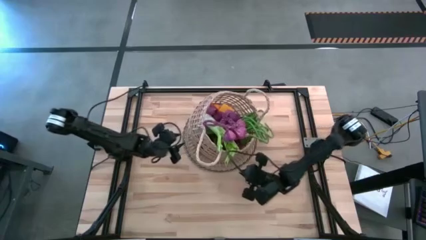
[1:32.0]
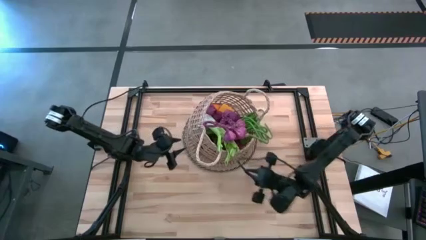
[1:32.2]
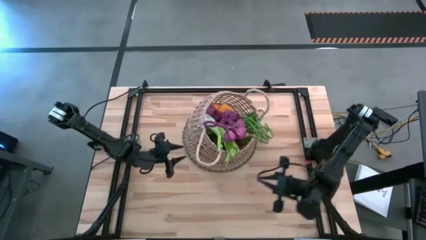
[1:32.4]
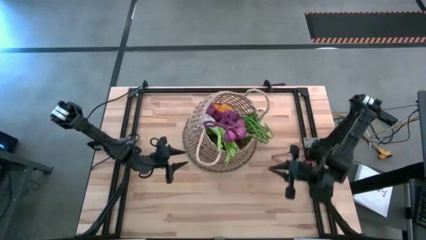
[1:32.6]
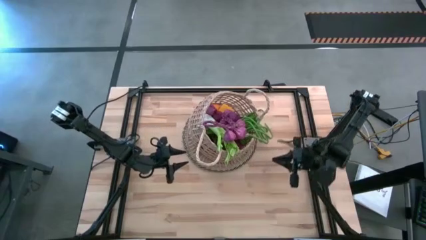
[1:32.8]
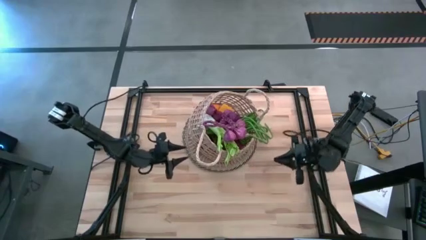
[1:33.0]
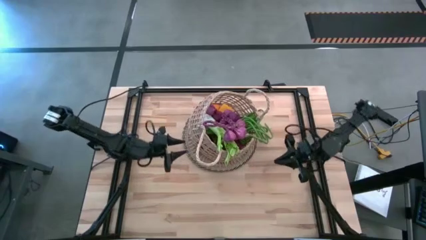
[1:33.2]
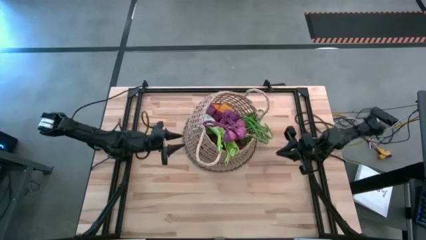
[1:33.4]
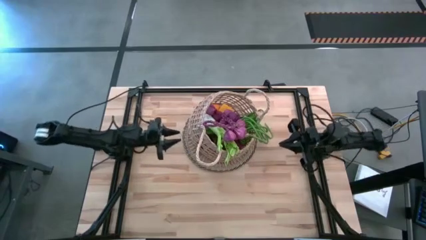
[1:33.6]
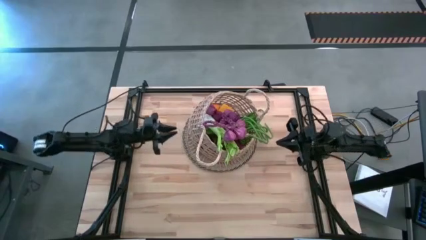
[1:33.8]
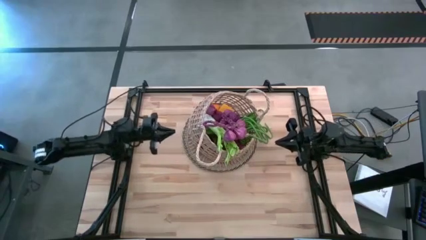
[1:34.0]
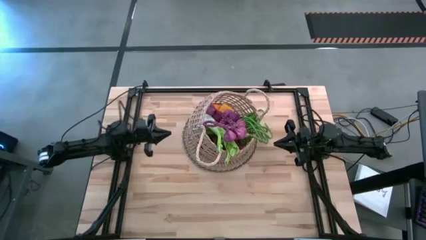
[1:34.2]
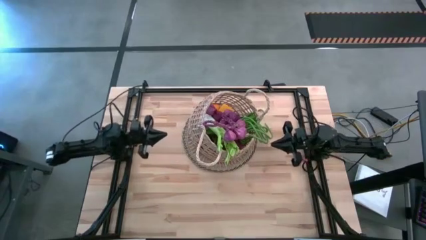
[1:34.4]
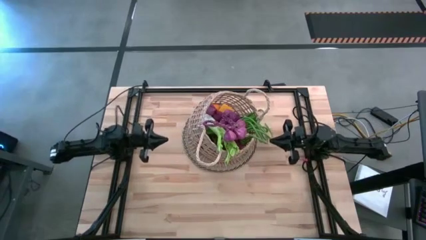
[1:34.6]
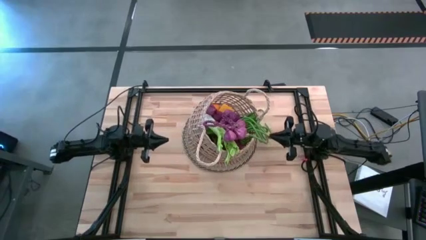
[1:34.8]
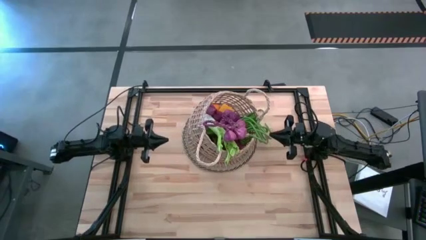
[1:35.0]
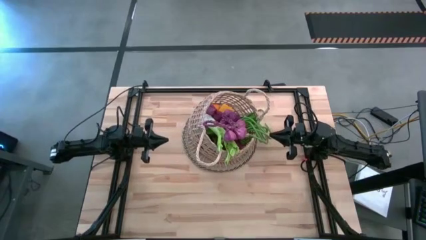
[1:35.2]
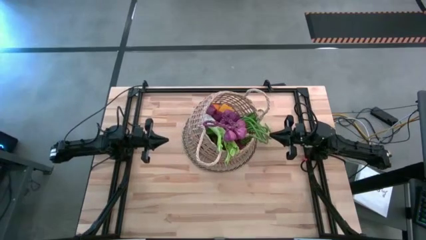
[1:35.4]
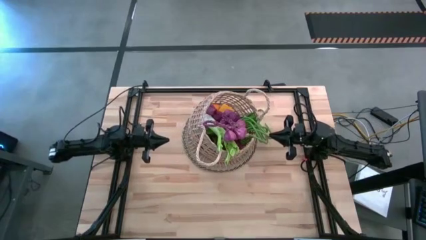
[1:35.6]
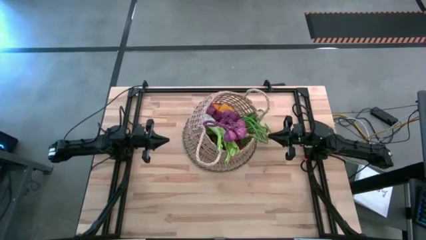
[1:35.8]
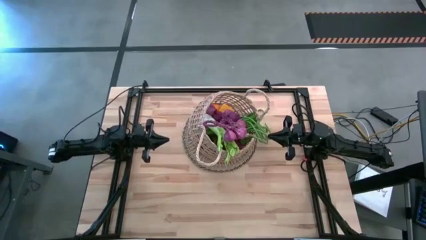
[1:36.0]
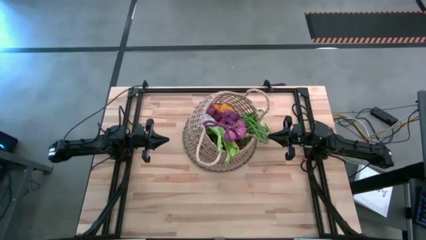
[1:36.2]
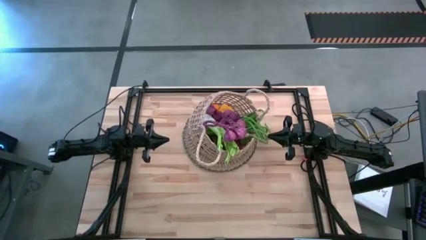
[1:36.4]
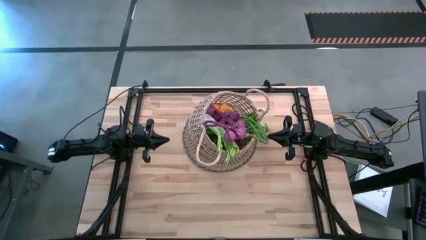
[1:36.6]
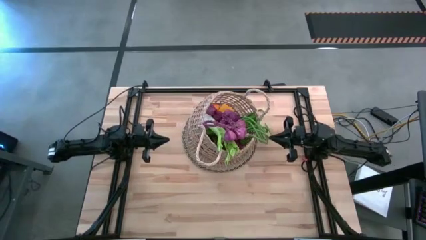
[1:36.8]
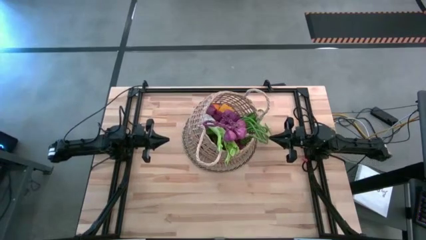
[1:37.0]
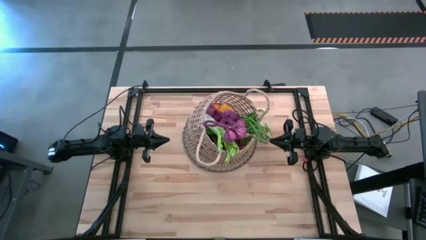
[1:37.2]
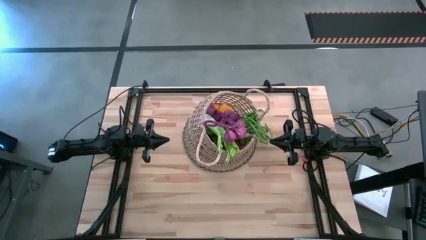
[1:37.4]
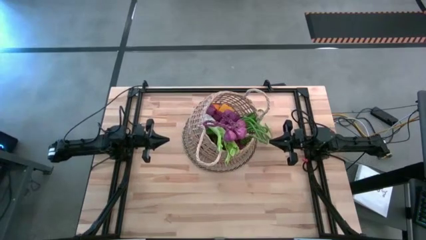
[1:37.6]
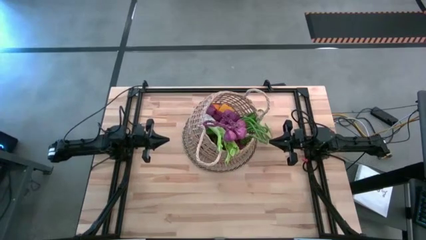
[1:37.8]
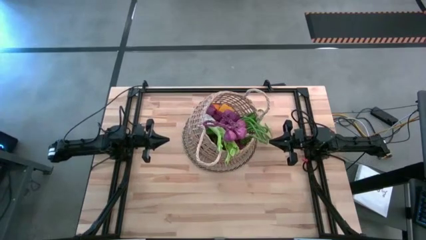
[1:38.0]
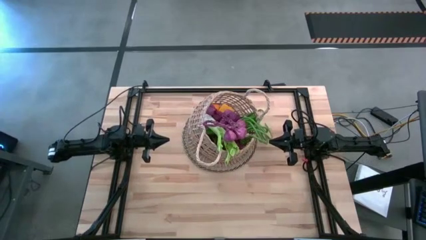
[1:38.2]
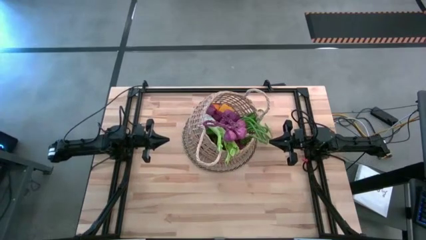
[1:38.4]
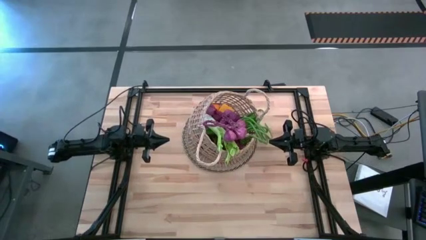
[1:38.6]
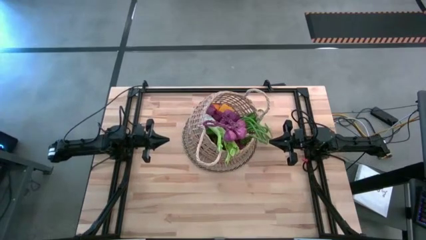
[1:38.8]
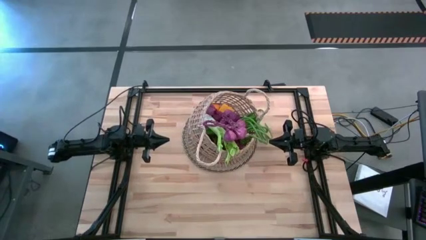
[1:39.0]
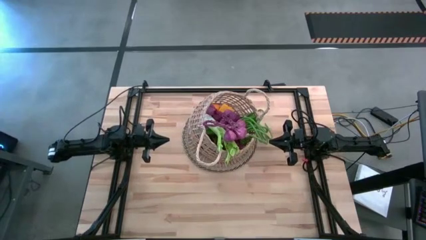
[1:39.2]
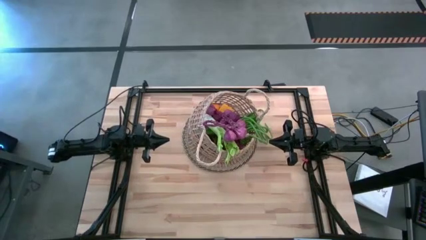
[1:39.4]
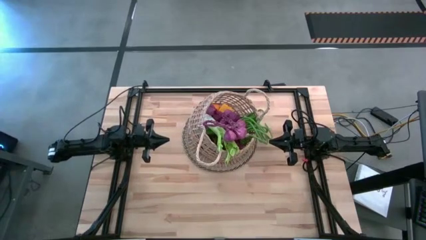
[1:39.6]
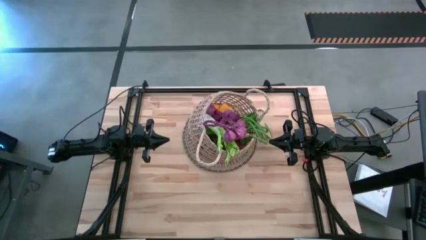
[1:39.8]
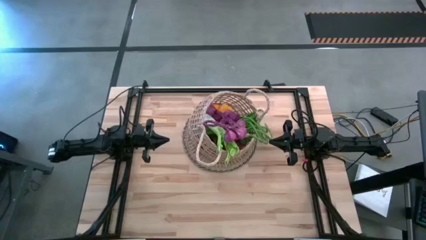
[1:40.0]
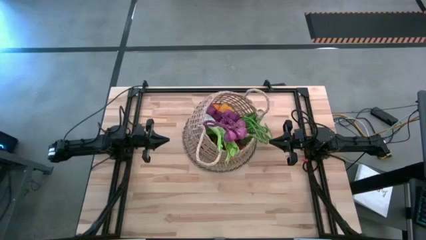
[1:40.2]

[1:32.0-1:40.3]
Task: Build produce basket
Return to Home Position

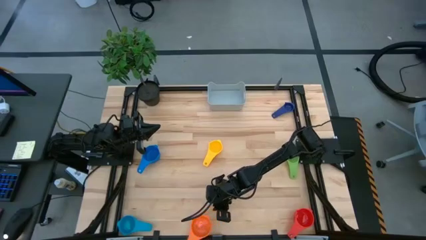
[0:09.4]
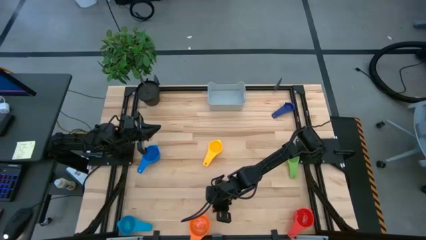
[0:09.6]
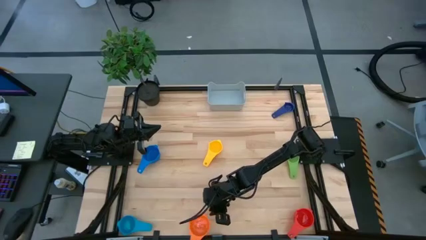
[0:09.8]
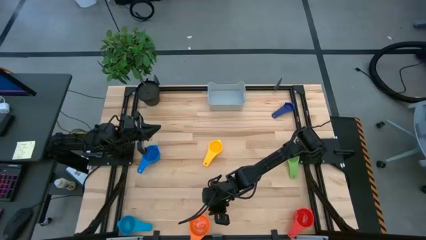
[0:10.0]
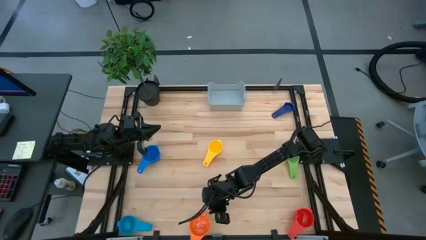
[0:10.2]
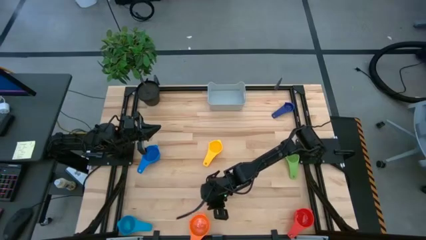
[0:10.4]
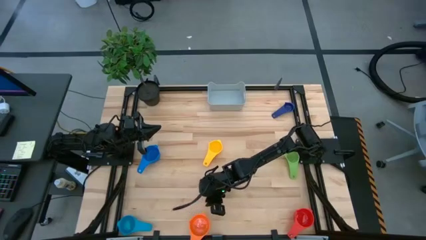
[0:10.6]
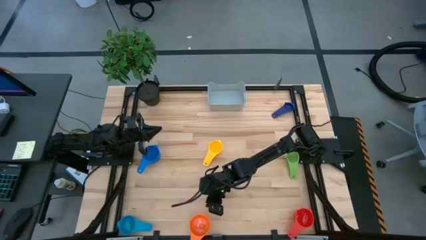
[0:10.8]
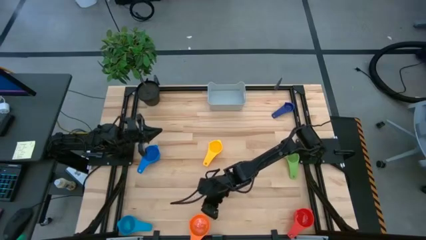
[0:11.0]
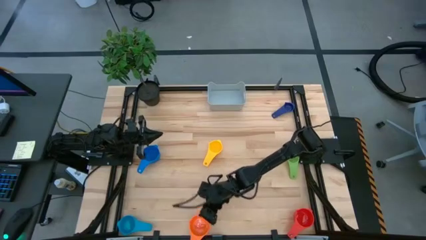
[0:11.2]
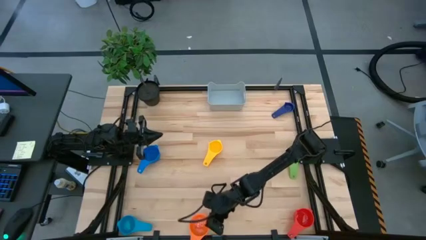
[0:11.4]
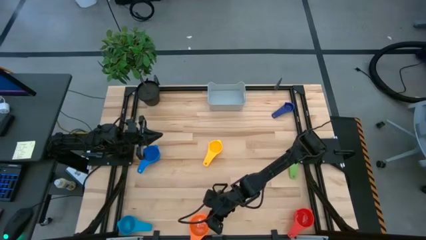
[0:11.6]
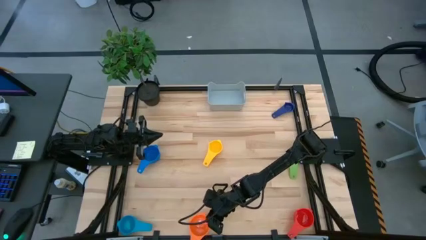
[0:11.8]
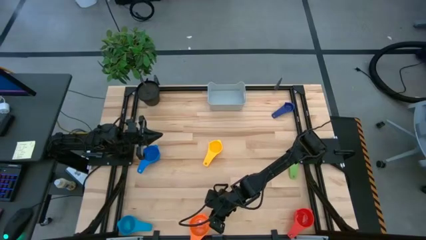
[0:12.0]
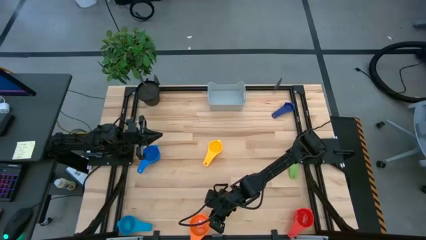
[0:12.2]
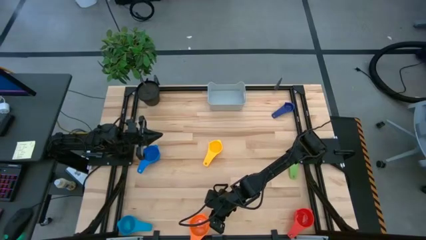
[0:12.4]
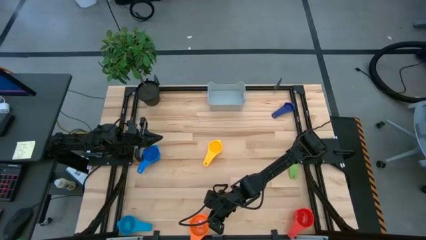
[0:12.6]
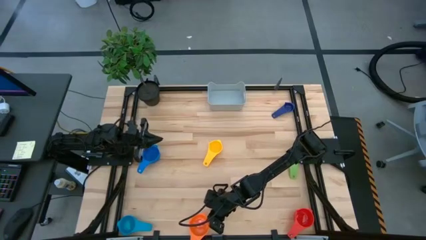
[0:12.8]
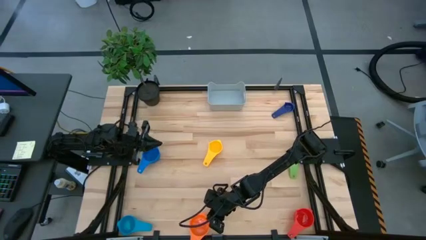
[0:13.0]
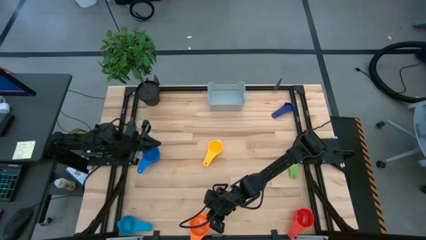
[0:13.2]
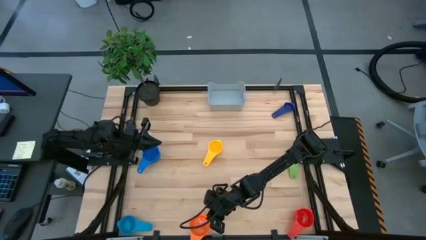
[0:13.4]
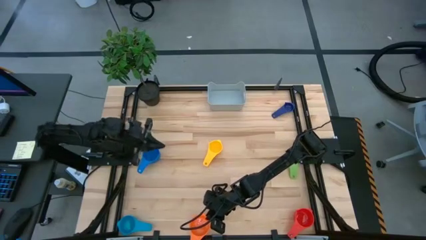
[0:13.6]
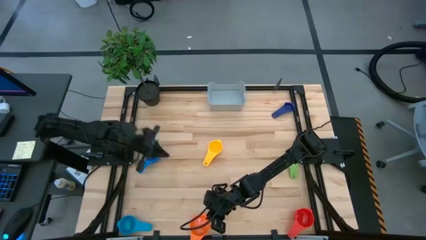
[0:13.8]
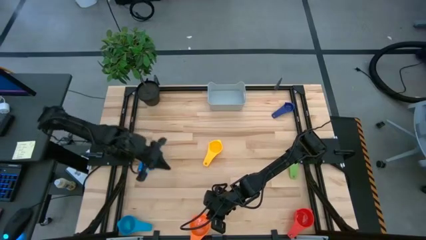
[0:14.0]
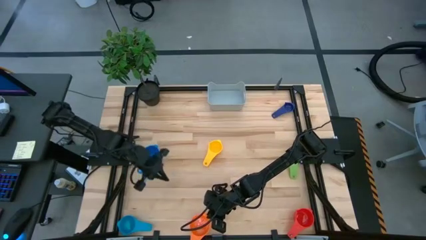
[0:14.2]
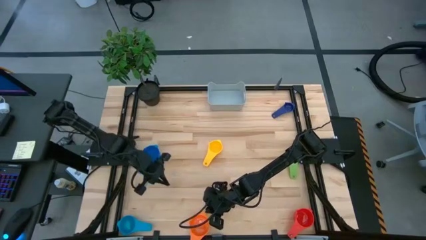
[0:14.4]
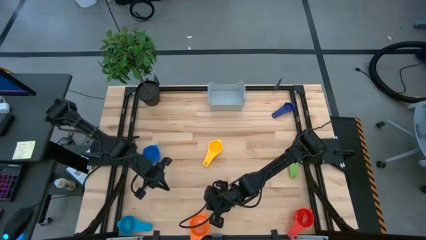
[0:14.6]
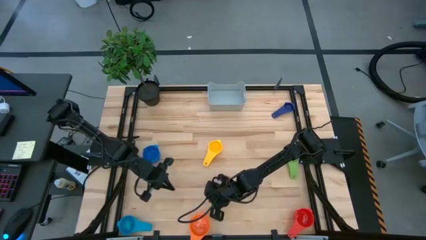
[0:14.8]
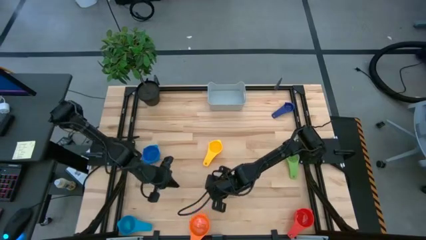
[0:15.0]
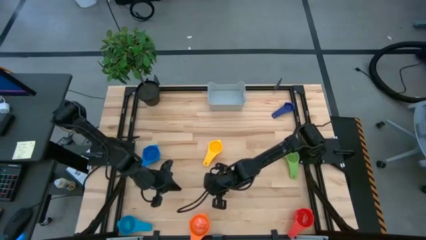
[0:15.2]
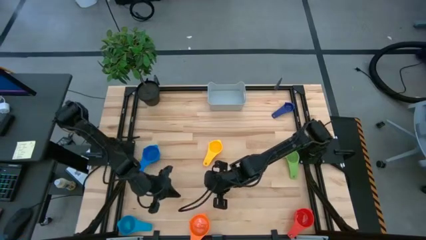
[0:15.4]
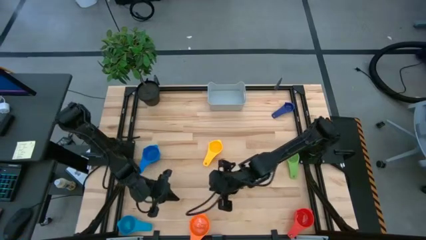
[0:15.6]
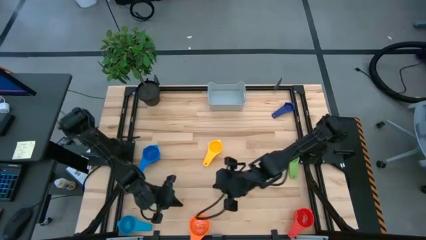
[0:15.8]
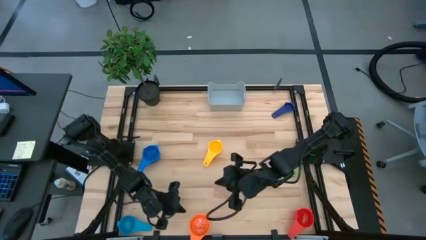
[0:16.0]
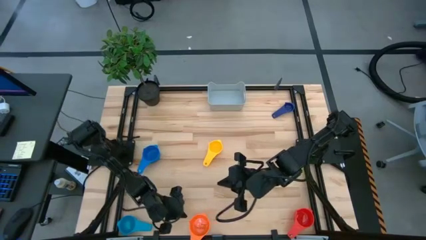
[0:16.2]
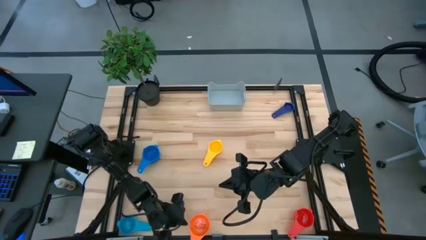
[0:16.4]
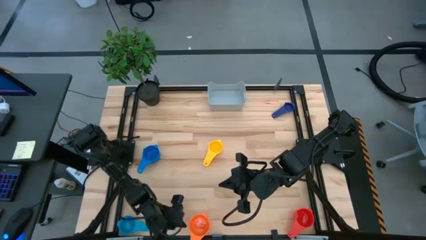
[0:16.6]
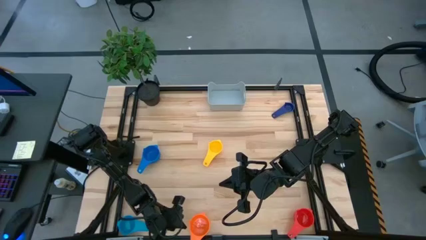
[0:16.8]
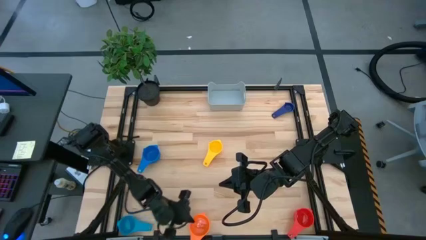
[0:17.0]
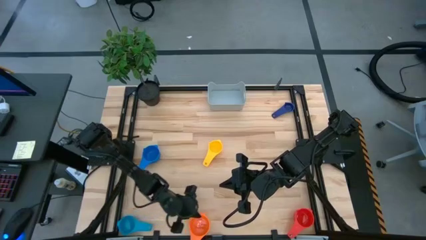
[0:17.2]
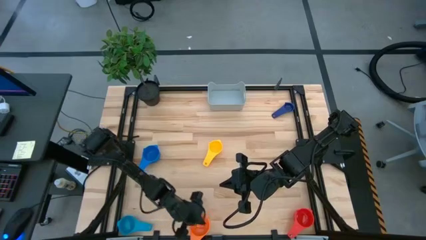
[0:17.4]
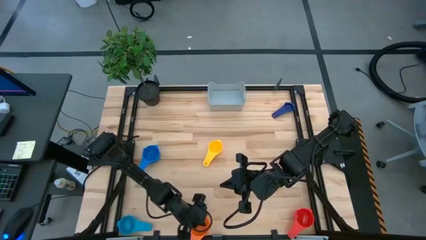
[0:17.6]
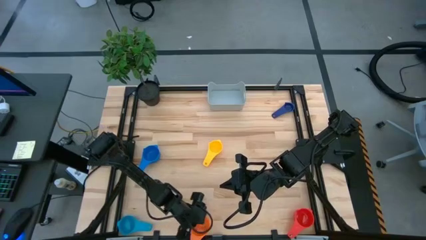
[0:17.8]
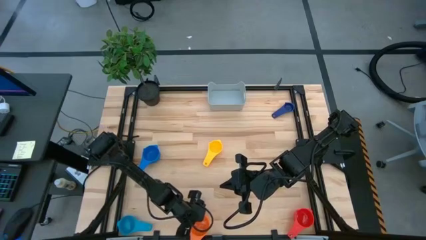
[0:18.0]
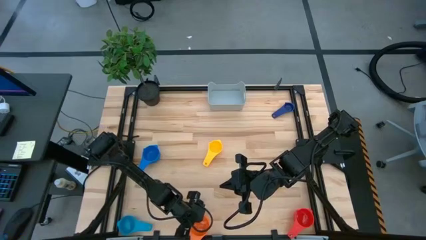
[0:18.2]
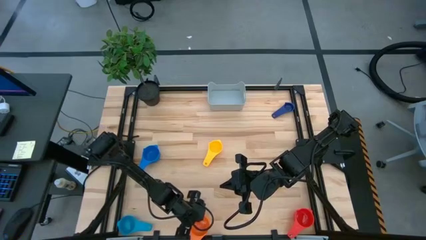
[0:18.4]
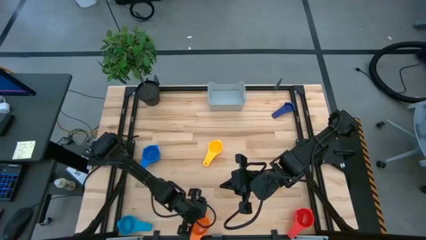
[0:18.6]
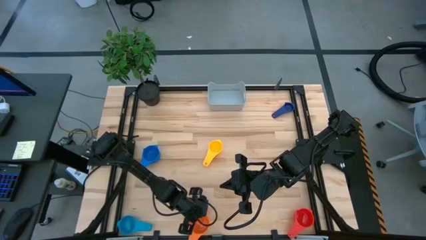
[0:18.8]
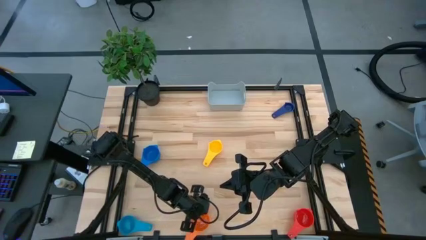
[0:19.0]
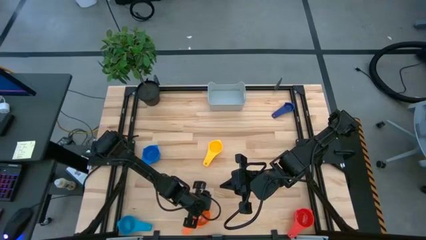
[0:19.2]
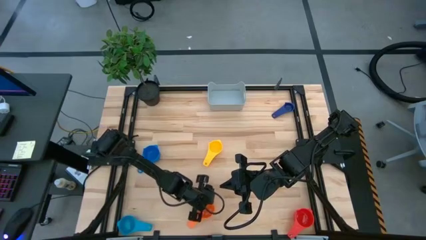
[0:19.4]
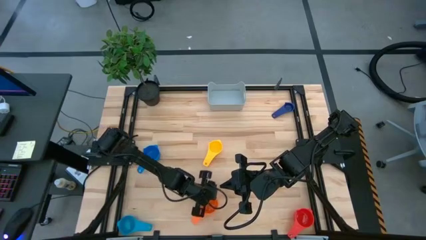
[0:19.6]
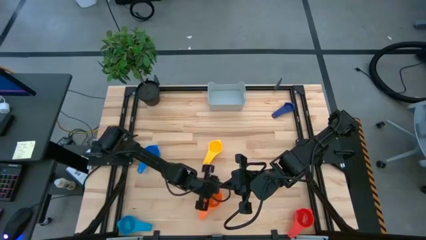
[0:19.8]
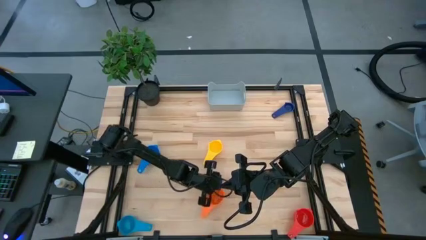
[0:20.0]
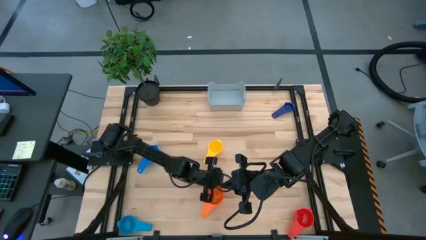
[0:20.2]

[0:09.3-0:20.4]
Task: Nest measuring cups in basket
Prepare the orange measuring cup
